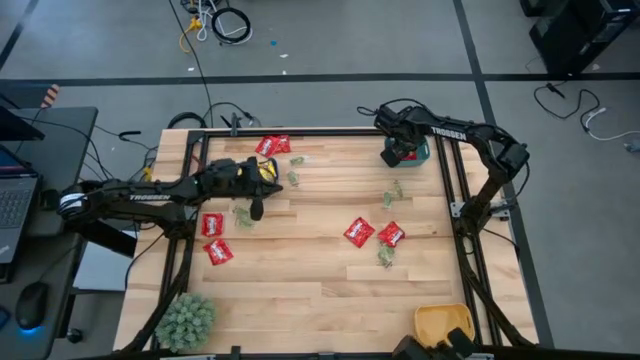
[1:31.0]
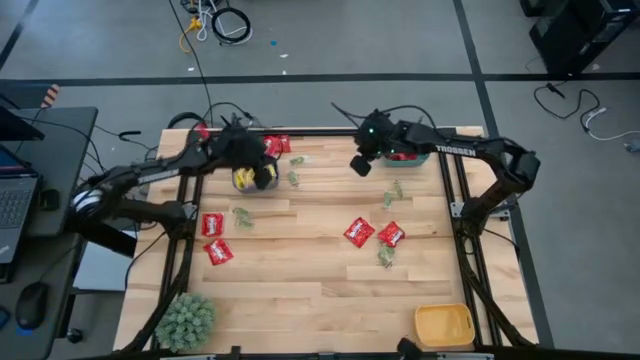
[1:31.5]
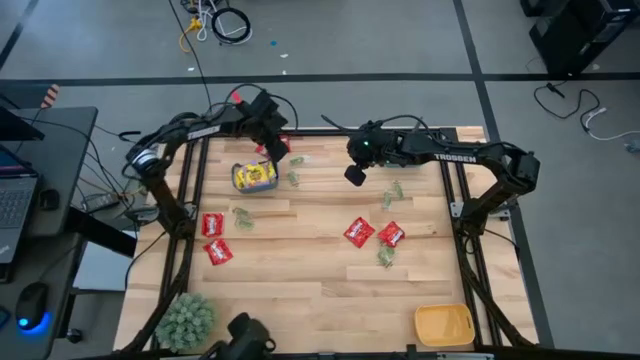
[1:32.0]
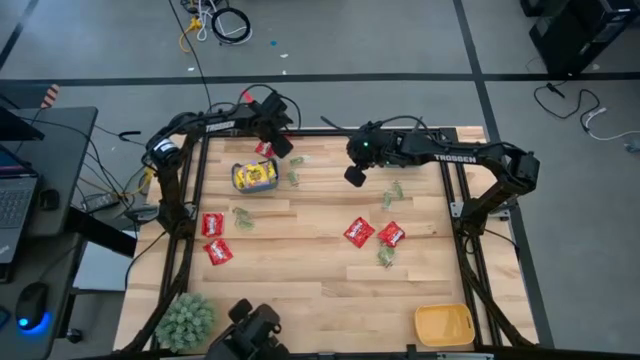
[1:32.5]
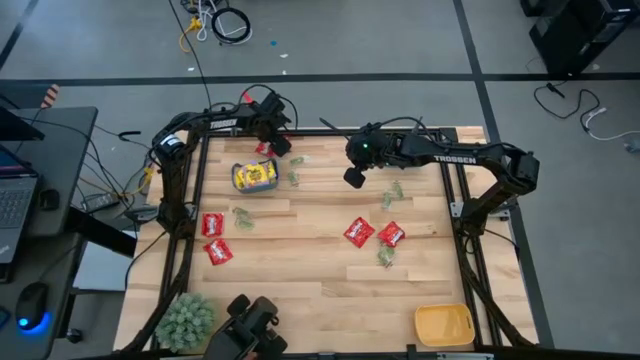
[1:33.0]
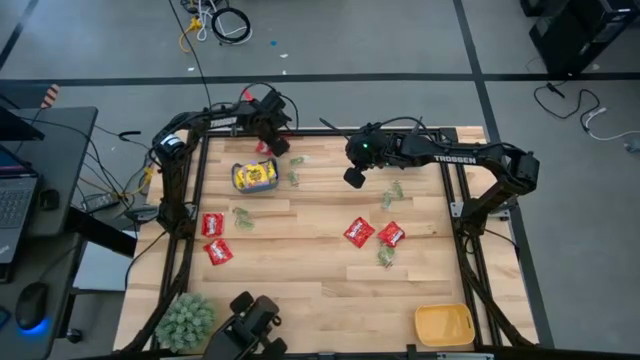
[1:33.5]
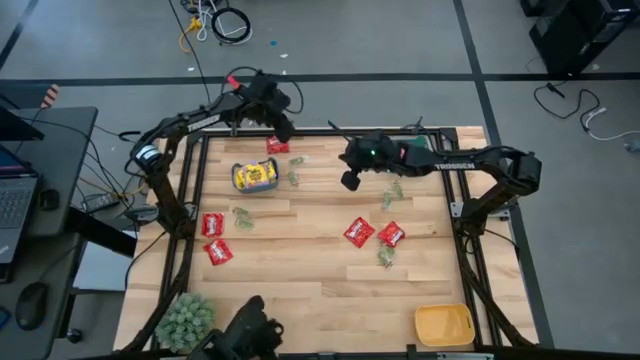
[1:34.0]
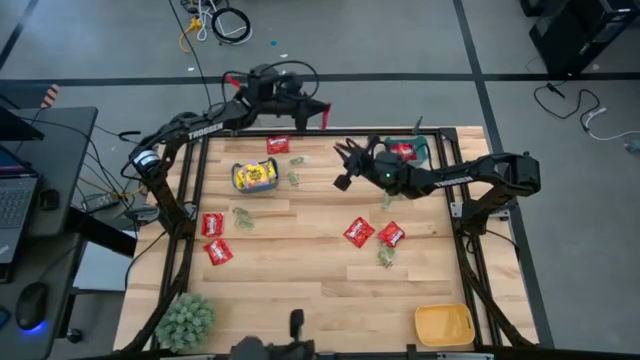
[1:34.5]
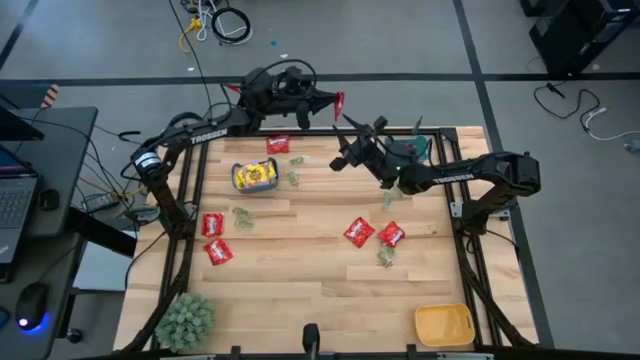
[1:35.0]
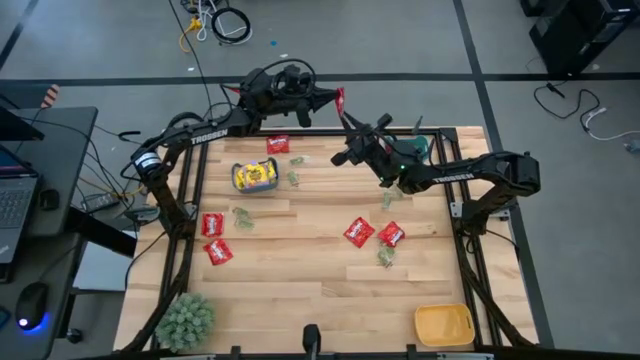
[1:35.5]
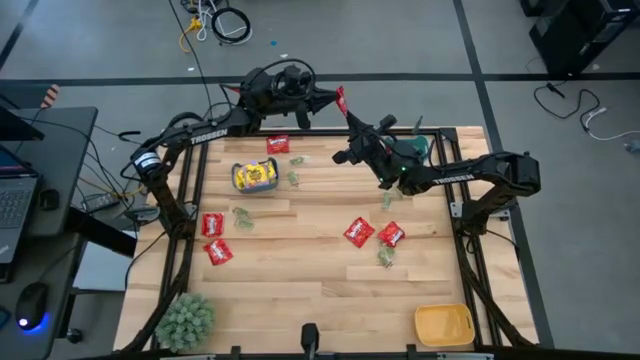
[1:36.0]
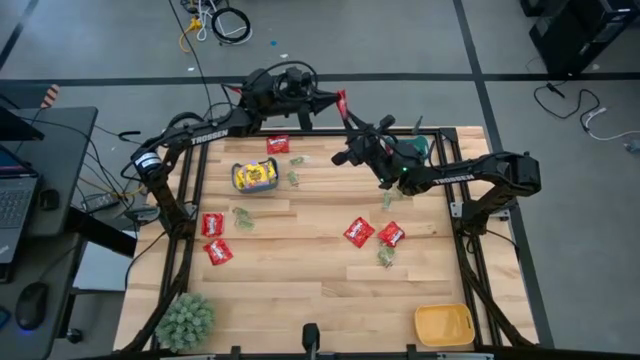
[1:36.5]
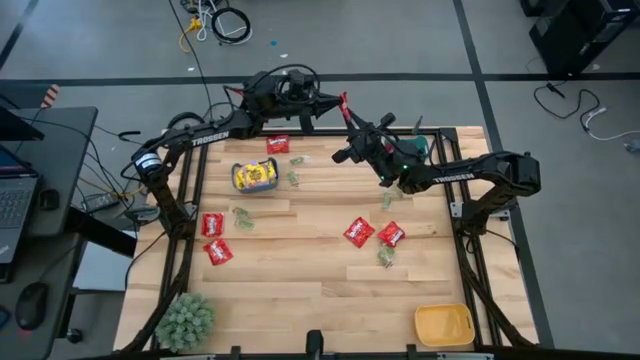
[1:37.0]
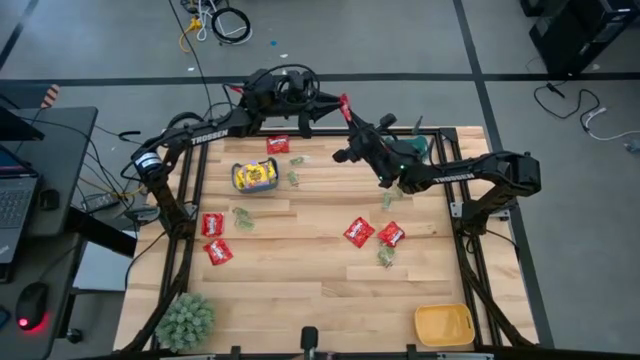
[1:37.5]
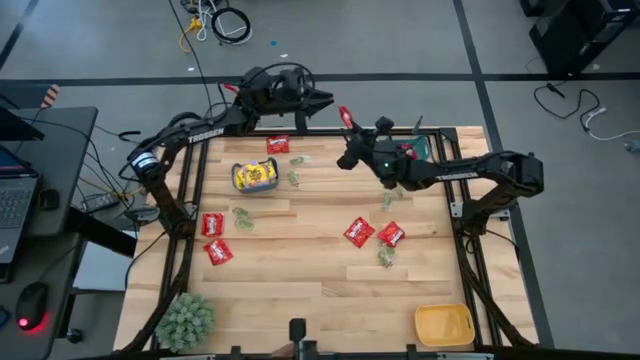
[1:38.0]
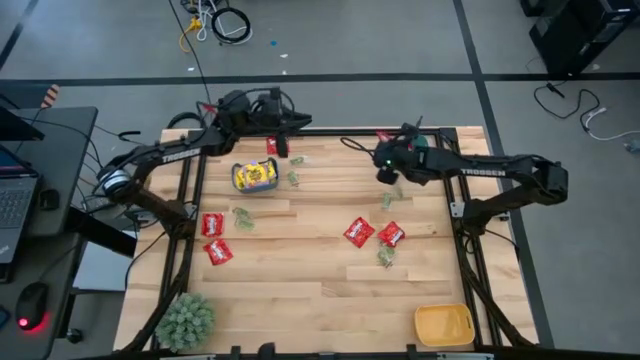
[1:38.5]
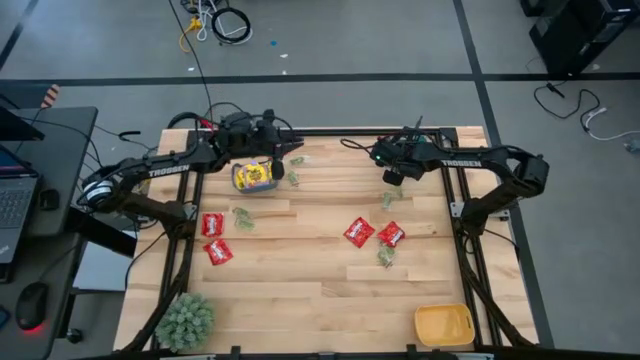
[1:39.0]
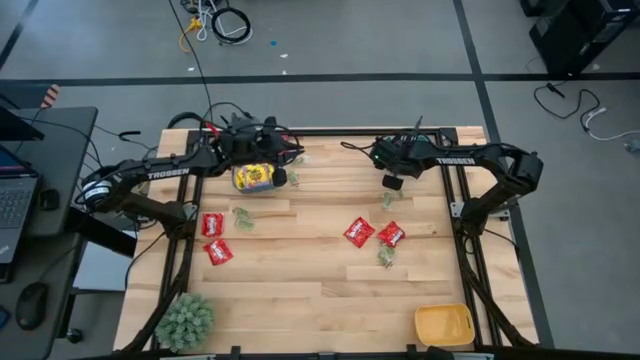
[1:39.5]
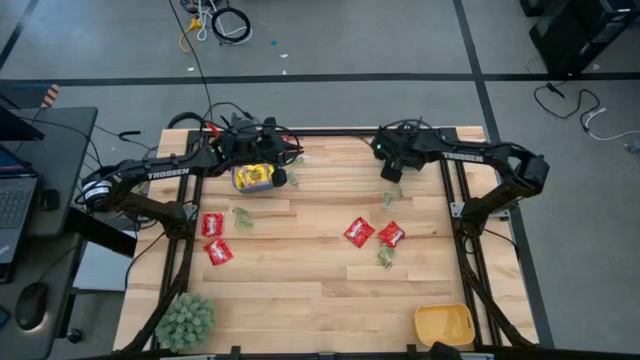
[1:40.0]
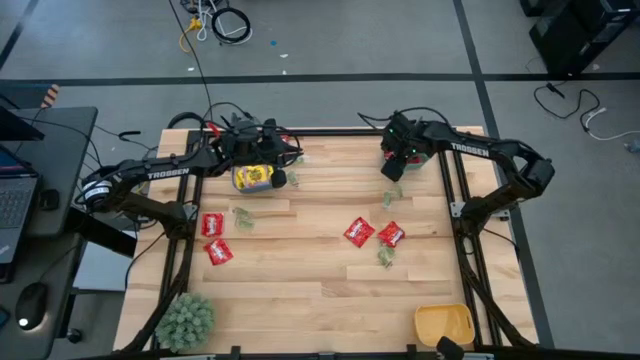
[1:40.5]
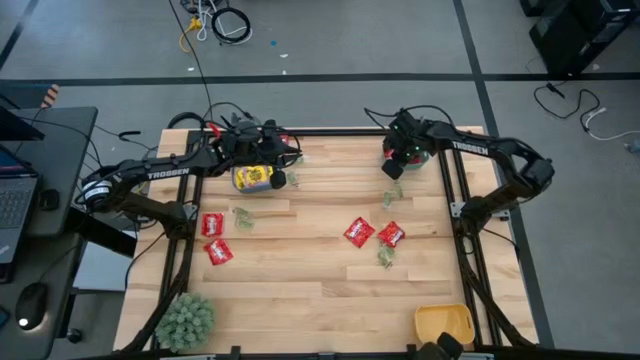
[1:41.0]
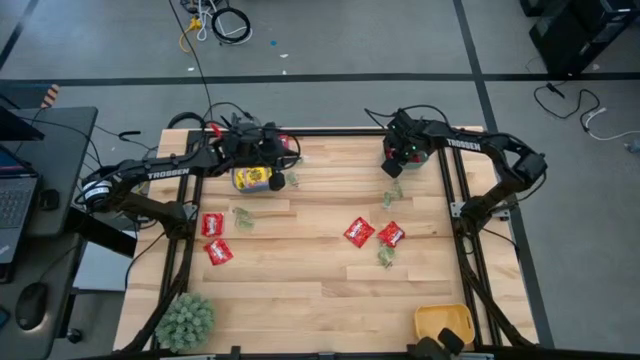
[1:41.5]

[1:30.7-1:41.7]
Task: Sort candy
Put the red candy into the blue bin

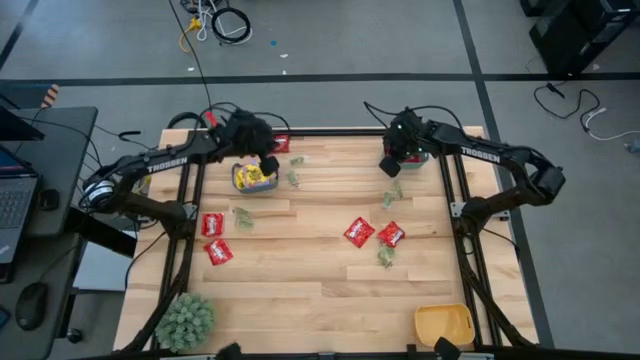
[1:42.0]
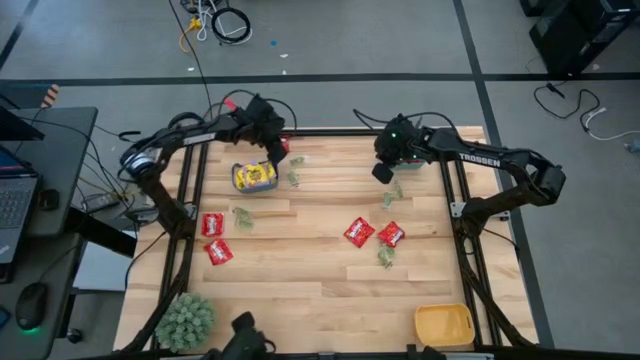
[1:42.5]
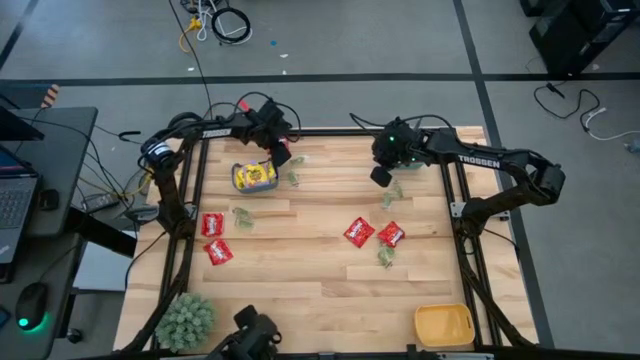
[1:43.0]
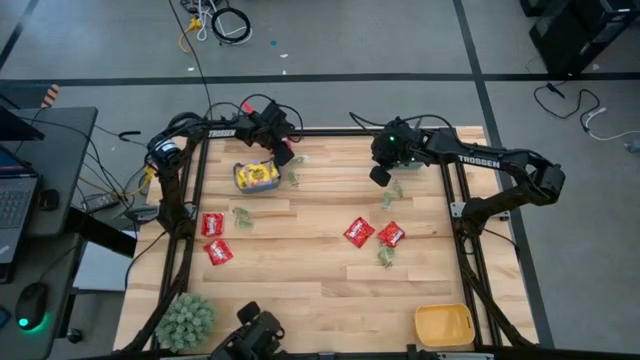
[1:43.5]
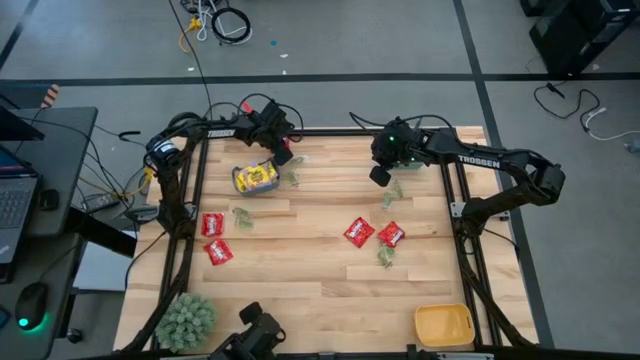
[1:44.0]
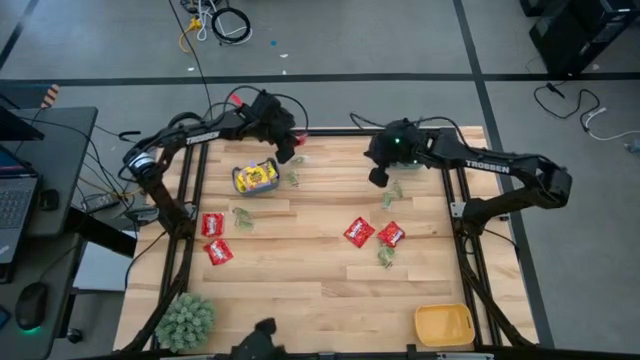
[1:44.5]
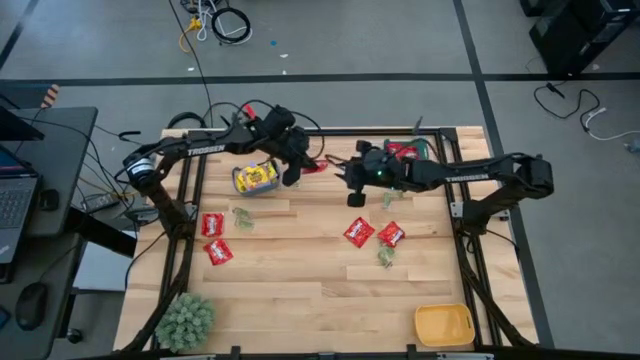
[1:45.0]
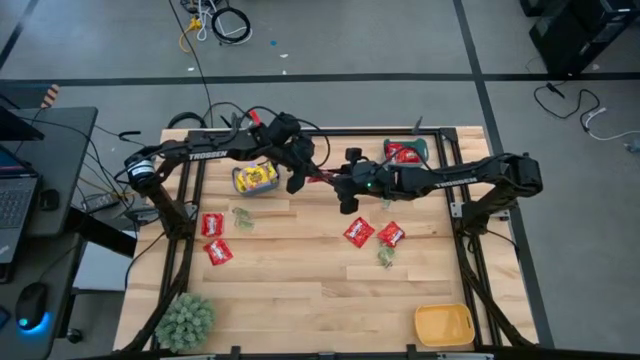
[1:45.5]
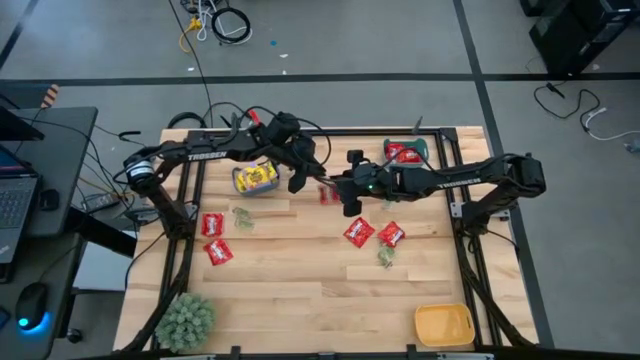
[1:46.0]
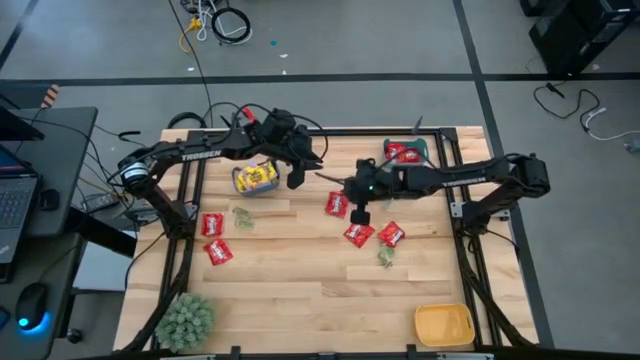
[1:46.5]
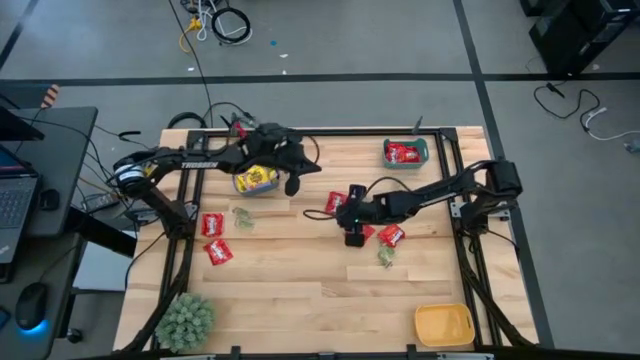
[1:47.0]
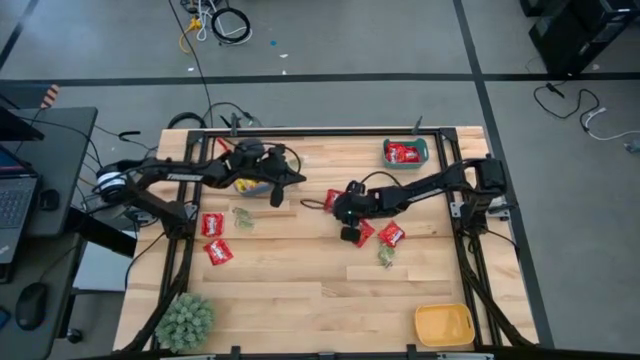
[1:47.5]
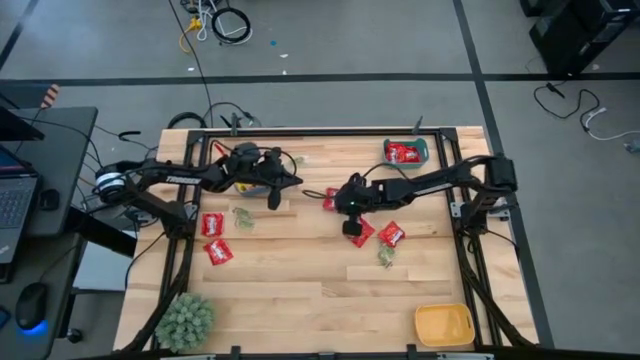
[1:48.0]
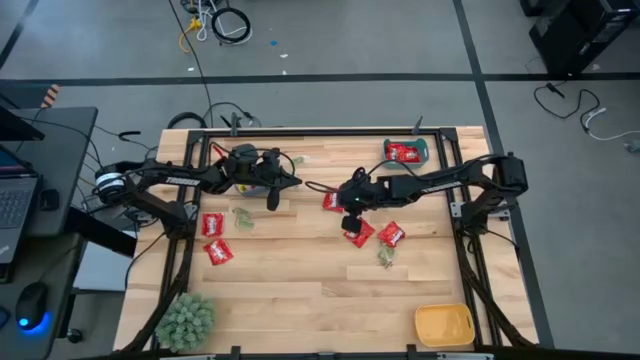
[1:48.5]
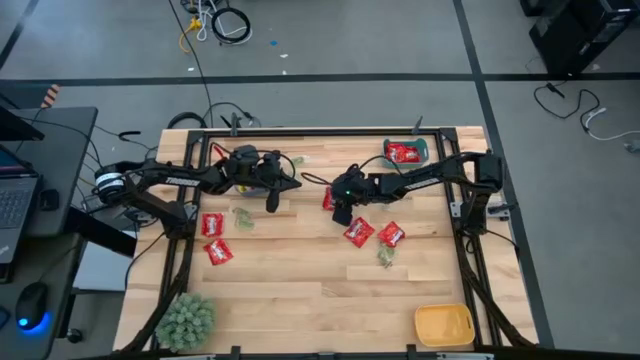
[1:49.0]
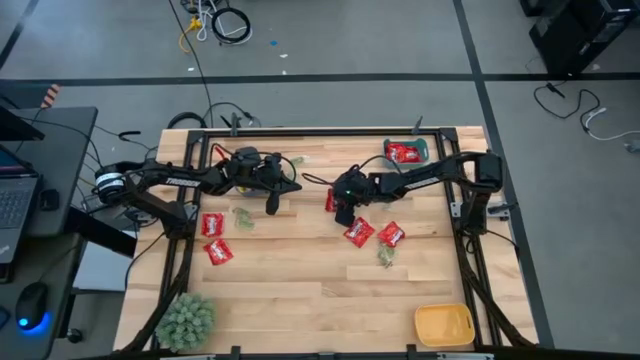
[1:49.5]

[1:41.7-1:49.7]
Put the red candy into the blue bin

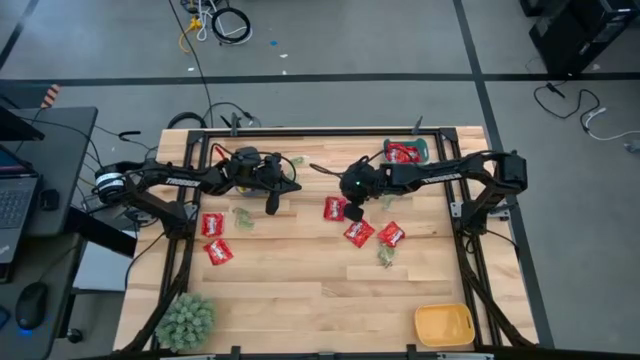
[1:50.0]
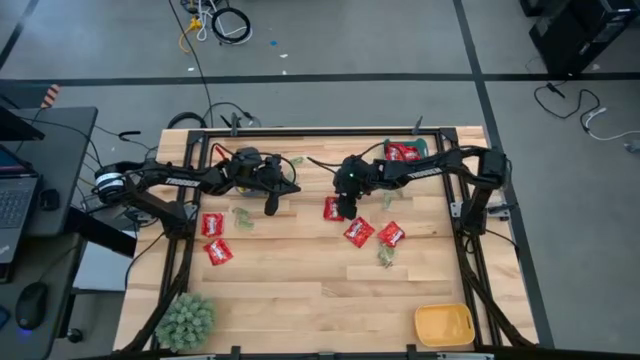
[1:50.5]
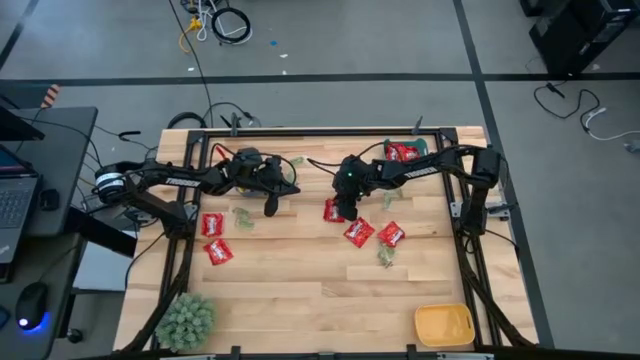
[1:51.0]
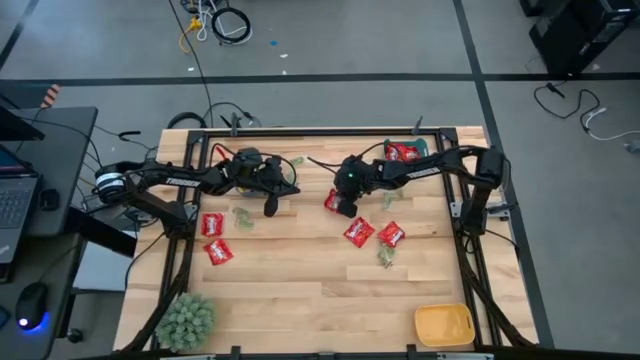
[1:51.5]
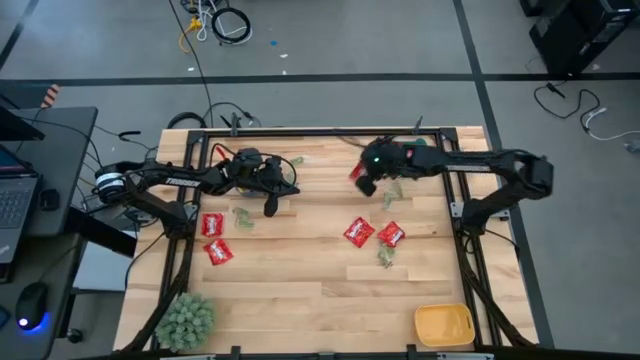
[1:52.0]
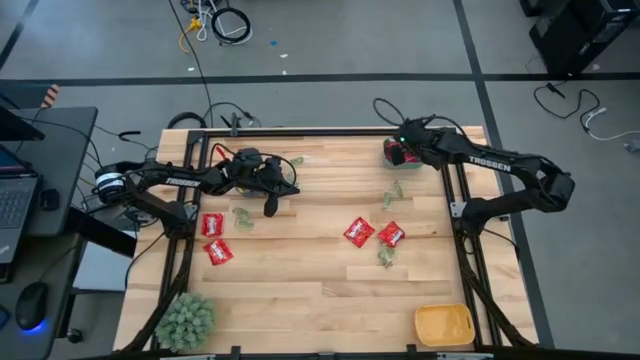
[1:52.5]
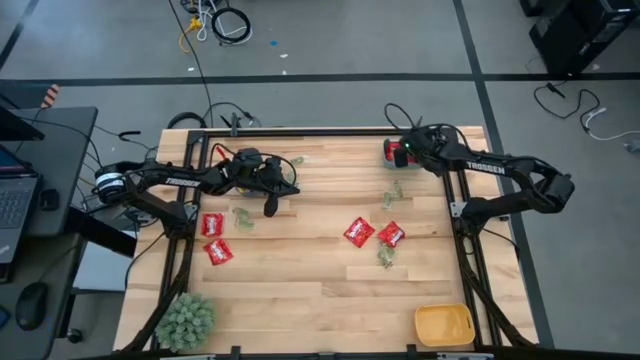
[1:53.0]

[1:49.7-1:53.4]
Put the red candy into the blue bin
